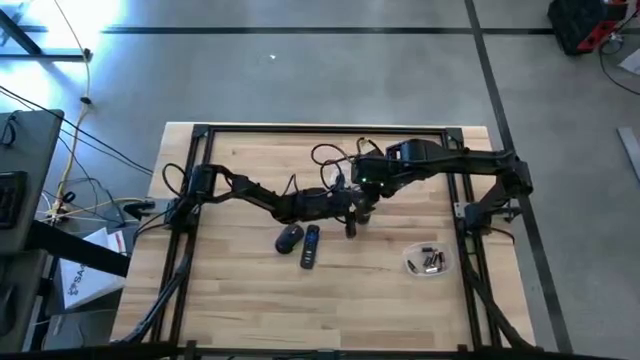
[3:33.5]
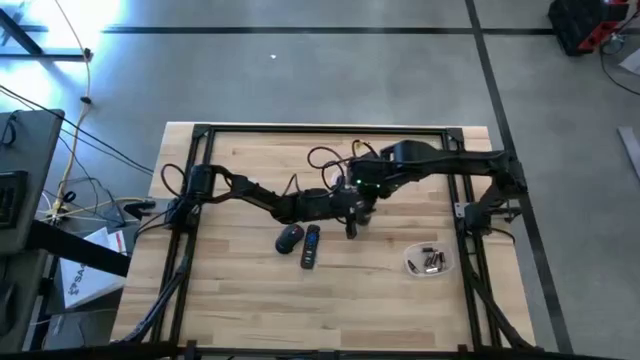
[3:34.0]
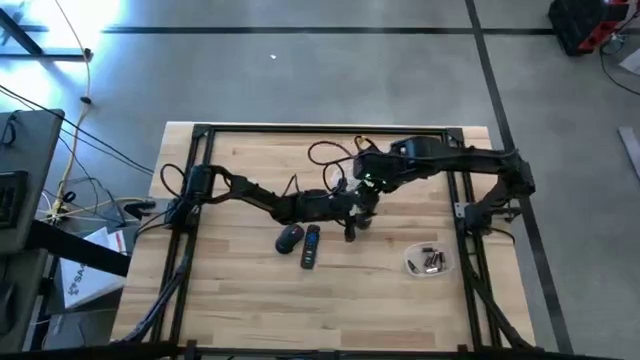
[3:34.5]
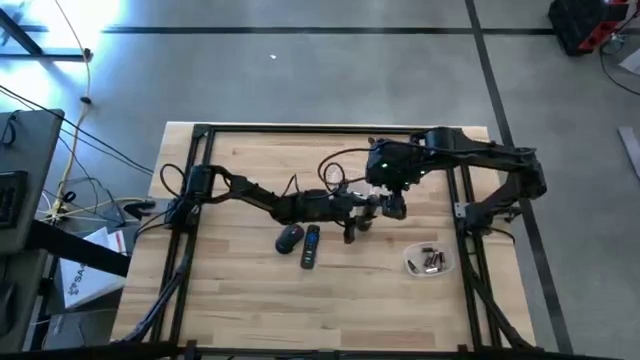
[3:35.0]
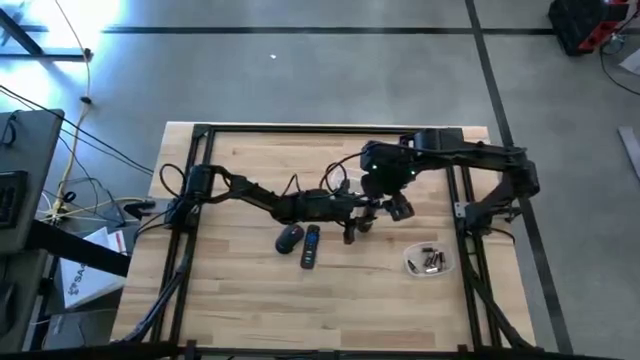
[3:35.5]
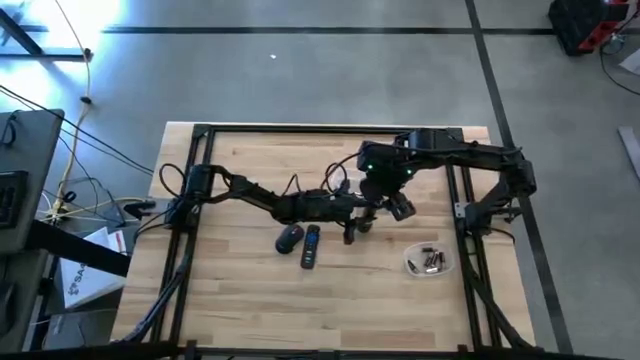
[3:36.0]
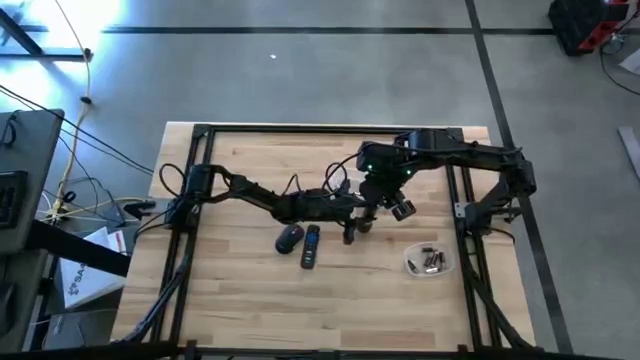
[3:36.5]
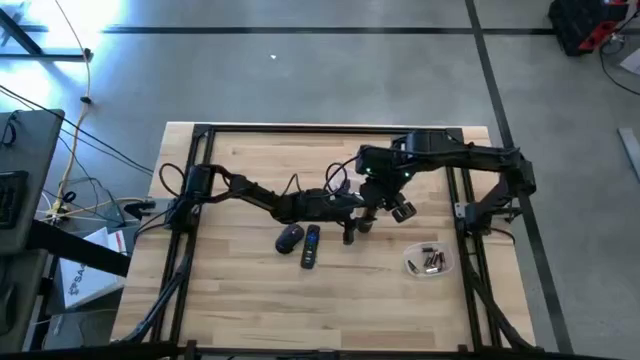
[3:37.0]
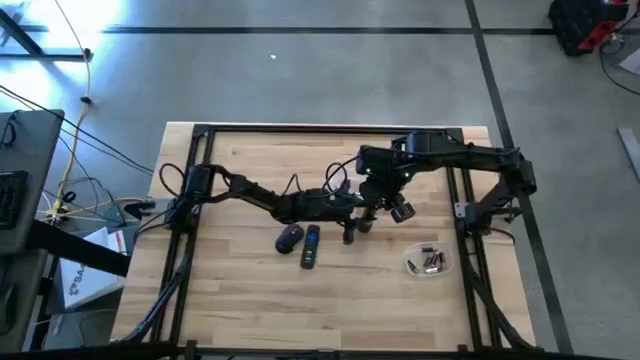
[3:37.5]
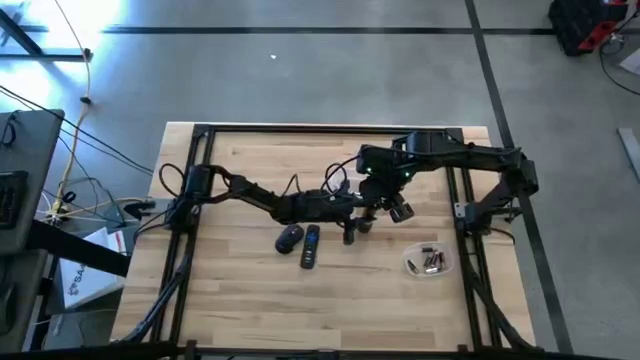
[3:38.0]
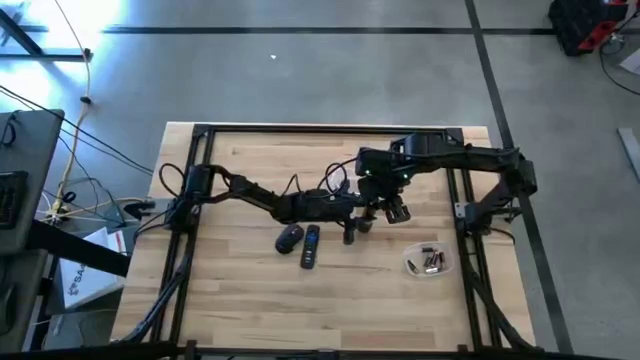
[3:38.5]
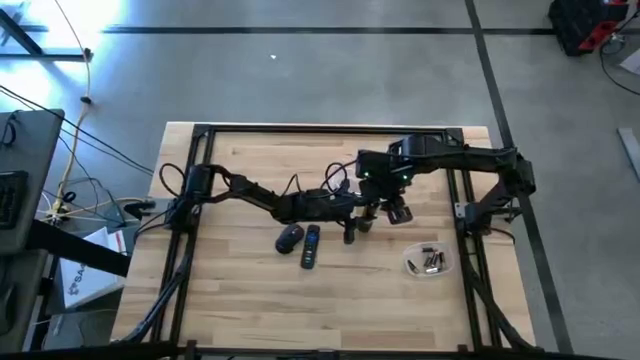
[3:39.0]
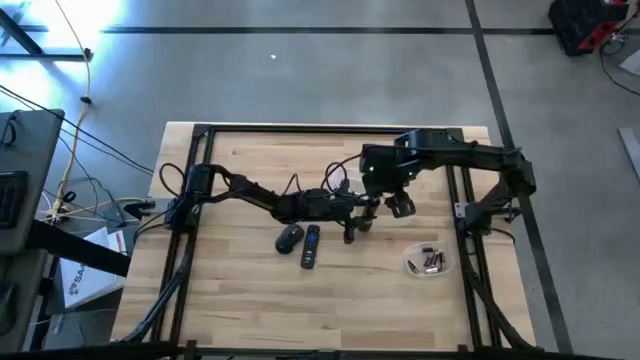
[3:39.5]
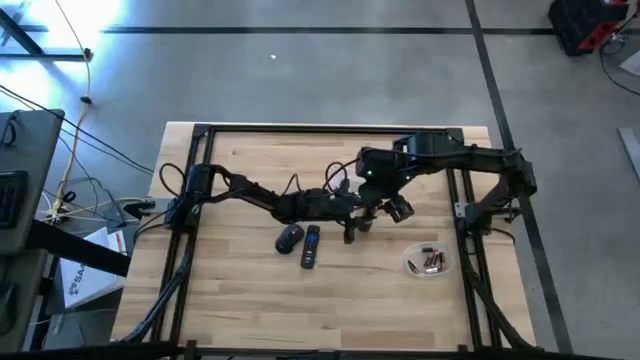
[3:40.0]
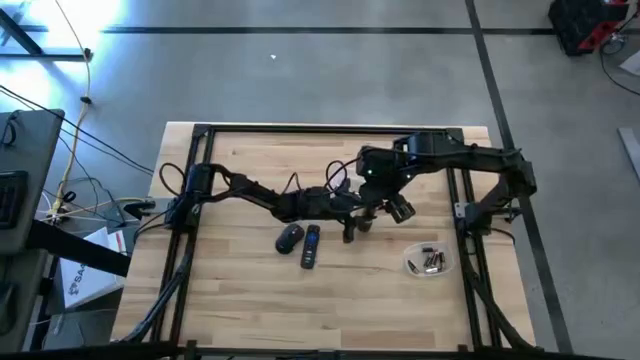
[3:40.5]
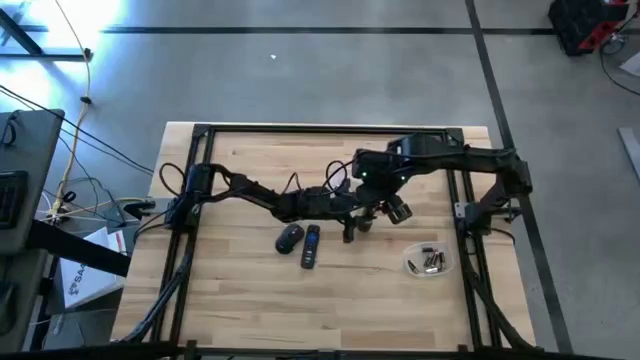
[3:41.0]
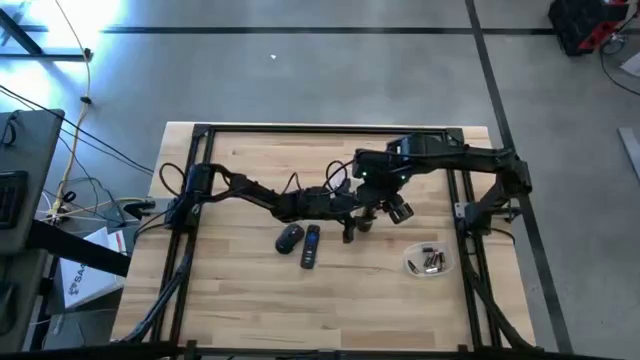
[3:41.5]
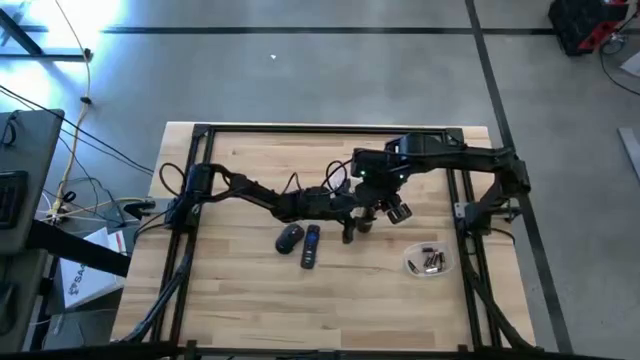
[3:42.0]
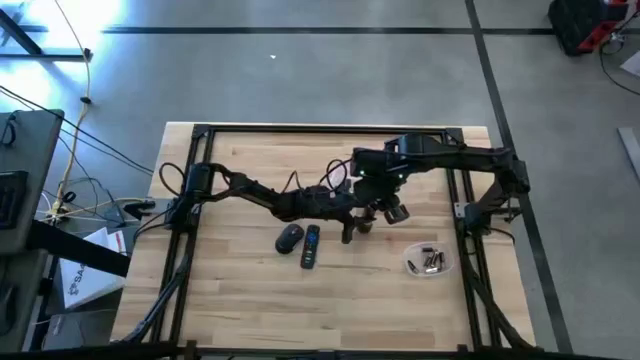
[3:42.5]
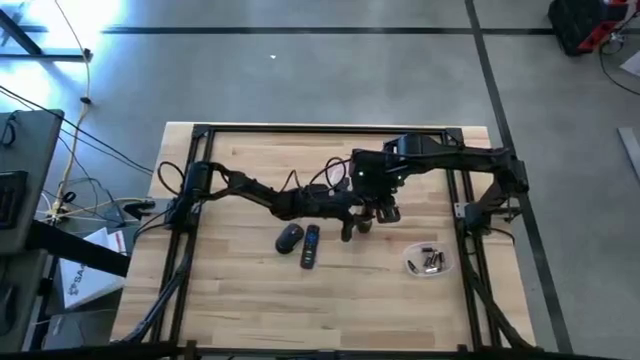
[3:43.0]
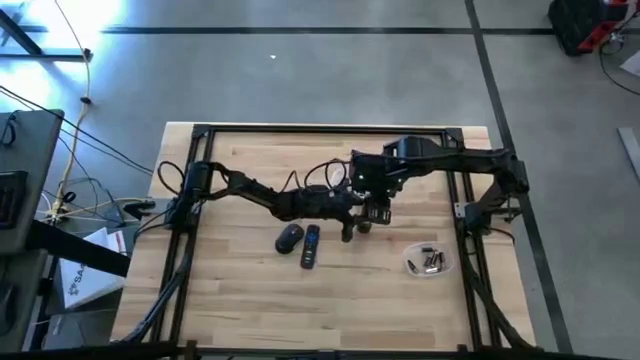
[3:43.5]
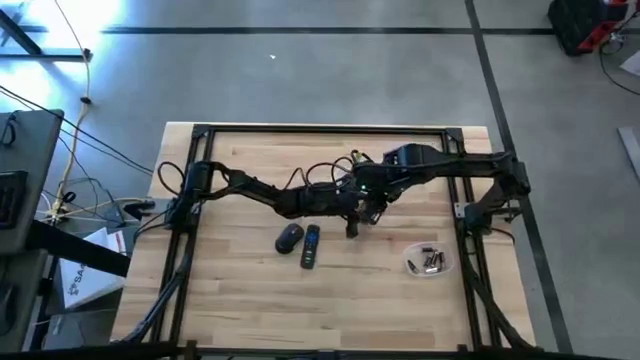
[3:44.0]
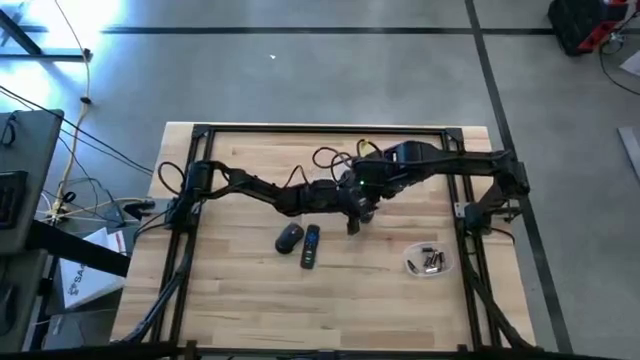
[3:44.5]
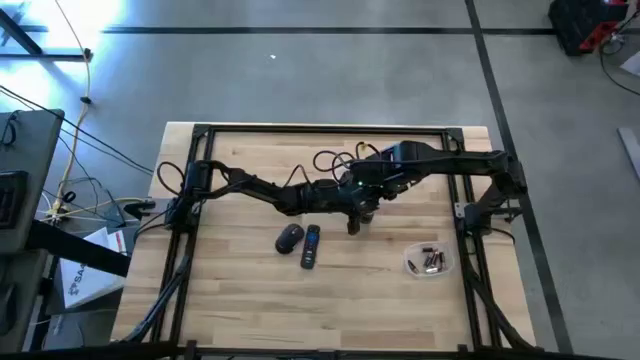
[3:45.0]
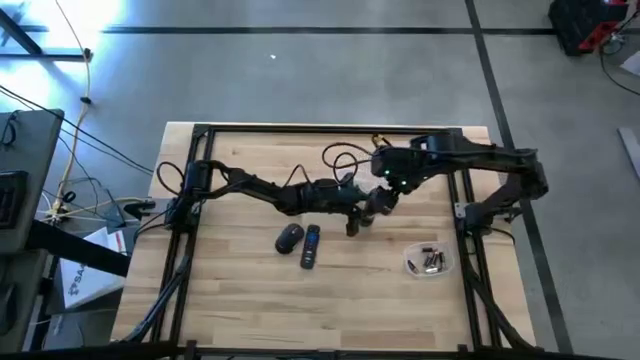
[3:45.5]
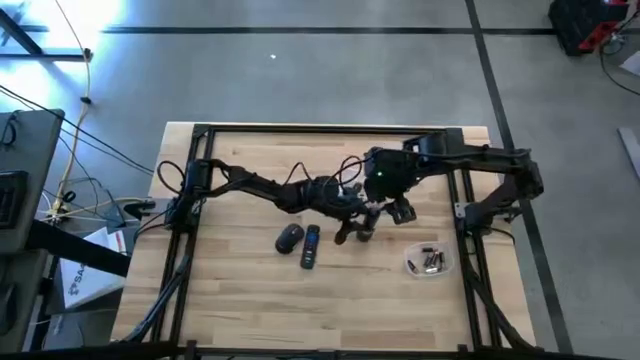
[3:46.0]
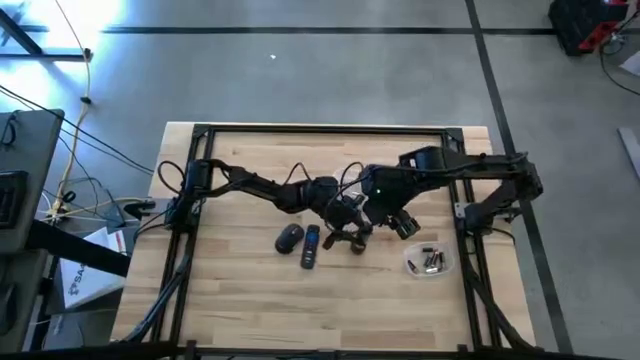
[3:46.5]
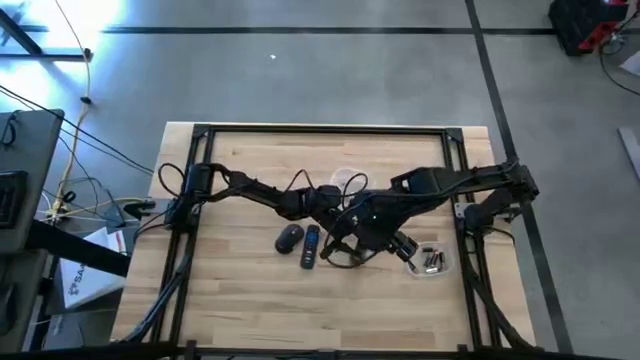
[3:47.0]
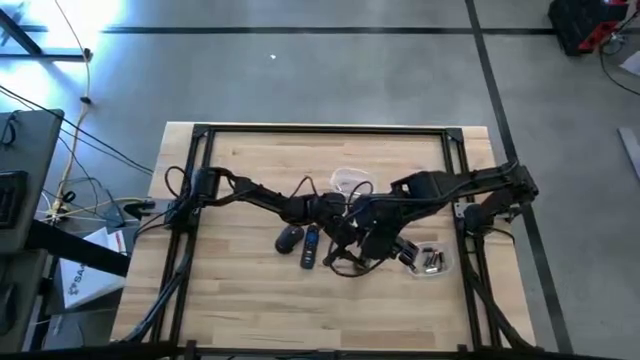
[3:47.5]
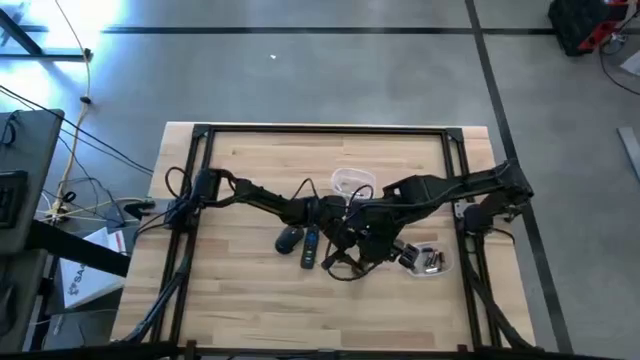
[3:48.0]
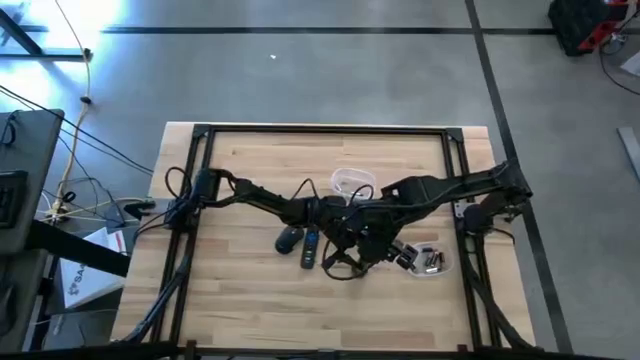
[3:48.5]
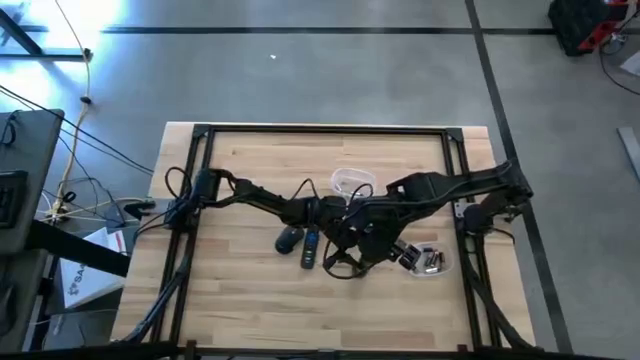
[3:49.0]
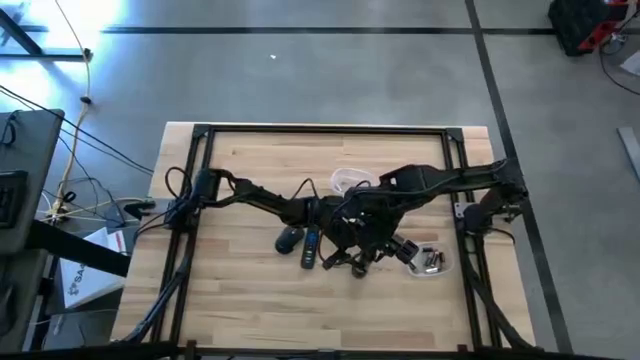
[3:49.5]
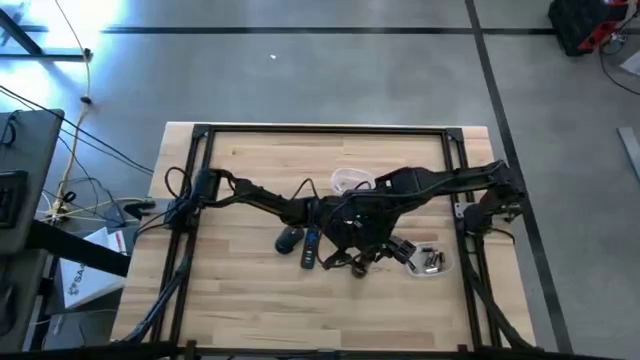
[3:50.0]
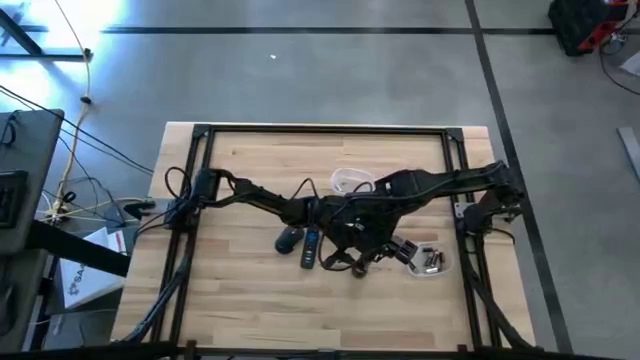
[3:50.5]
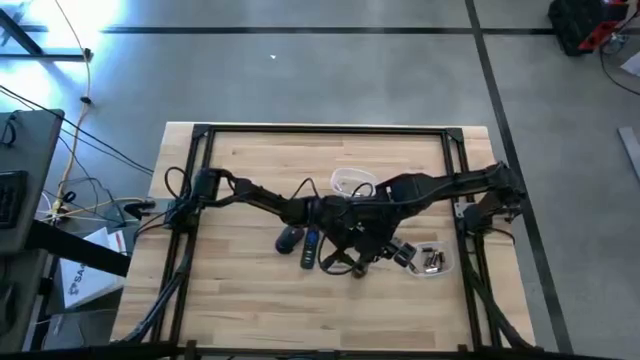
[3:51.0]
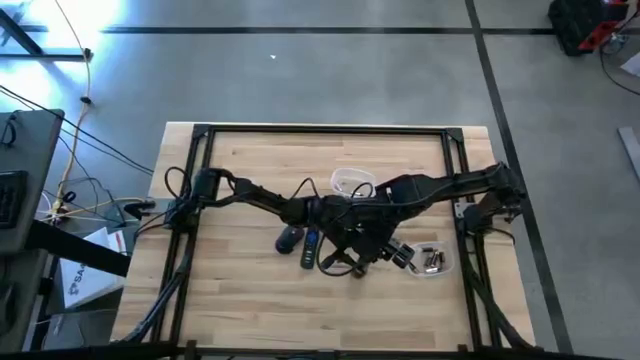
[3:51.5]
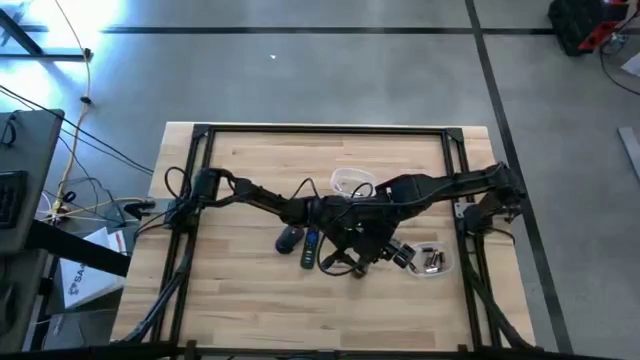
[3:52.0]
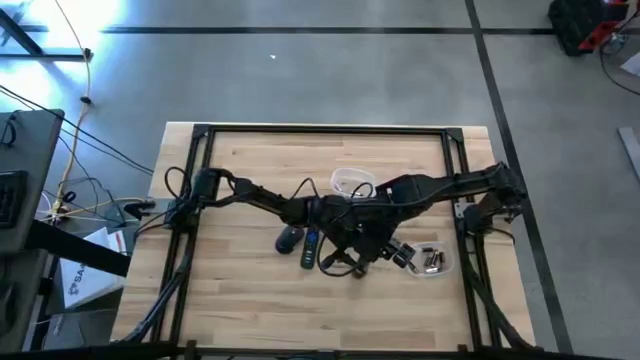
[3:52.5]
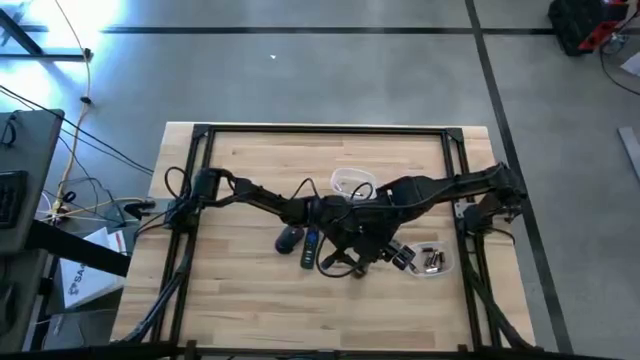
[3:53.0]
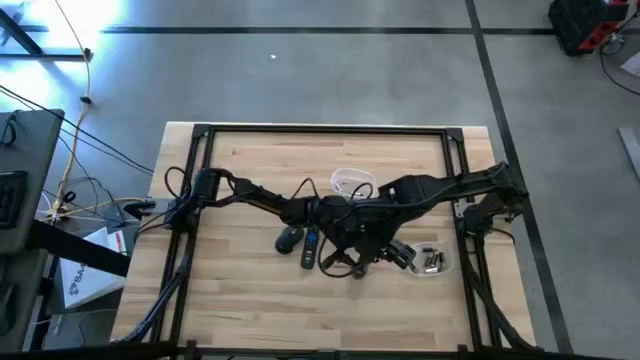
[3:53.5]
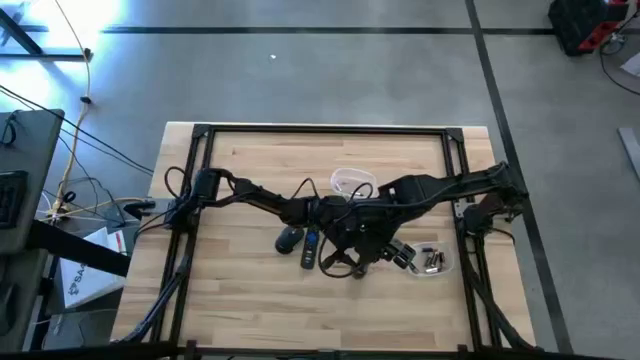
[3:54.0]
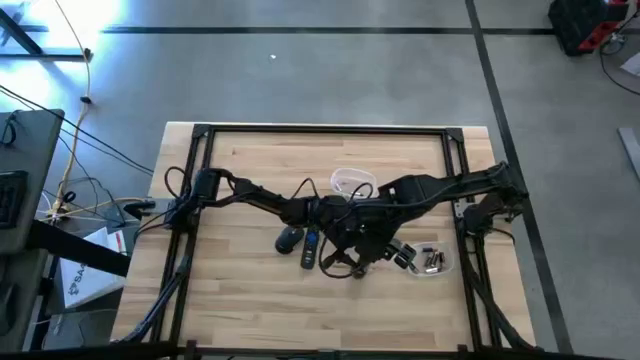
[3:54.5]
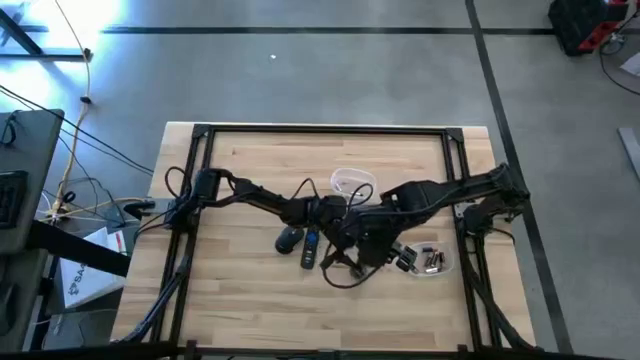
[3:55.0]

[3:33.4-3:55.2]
Task: Insert battery
Close the flashlight battery compartment
